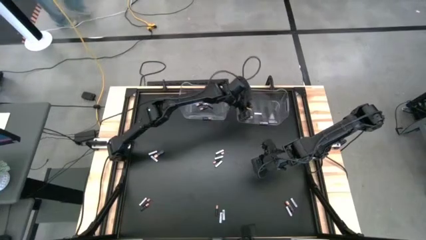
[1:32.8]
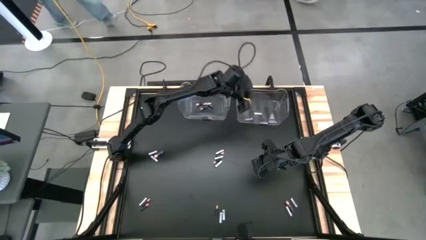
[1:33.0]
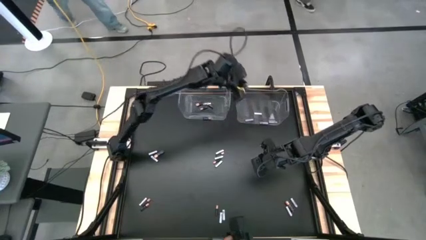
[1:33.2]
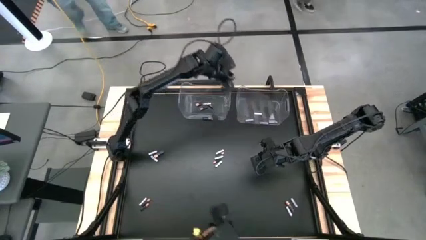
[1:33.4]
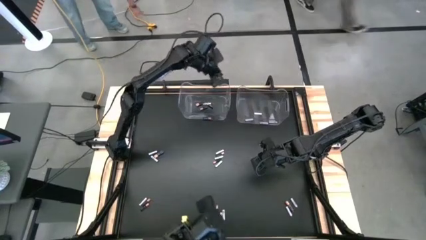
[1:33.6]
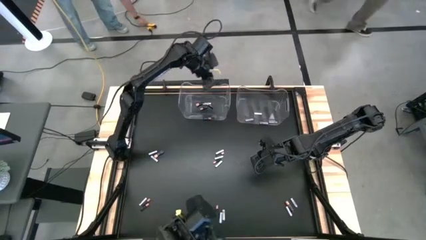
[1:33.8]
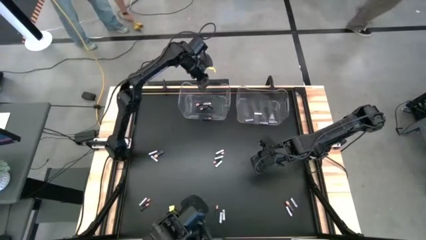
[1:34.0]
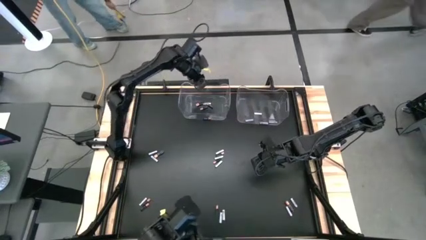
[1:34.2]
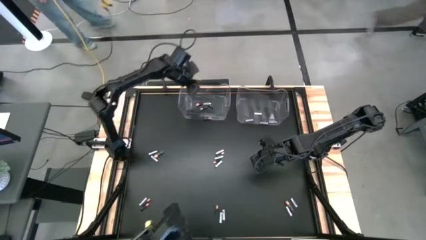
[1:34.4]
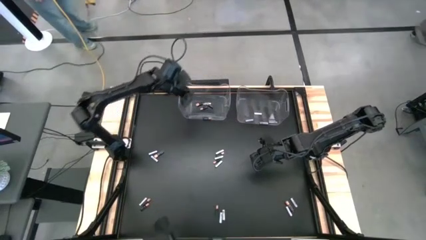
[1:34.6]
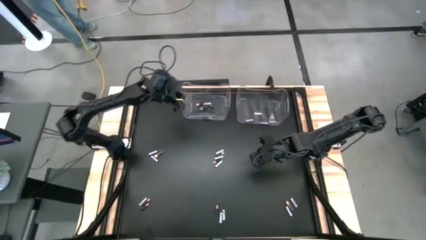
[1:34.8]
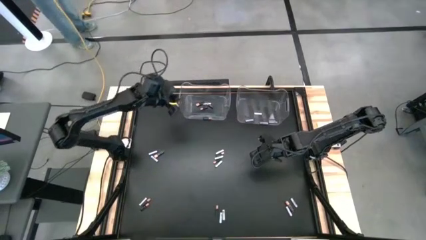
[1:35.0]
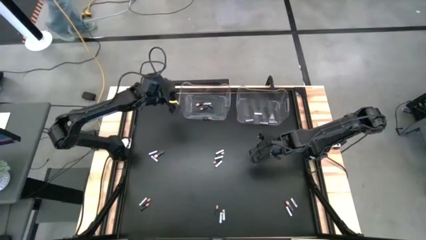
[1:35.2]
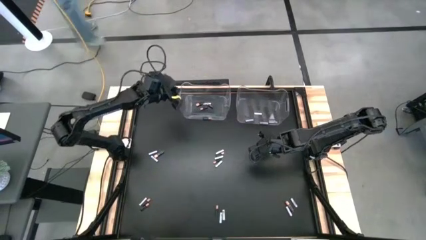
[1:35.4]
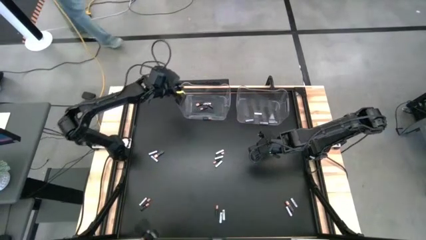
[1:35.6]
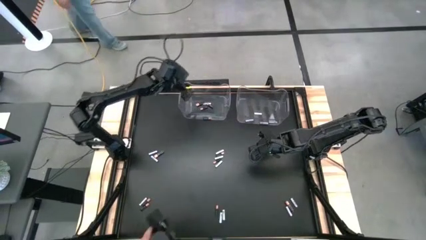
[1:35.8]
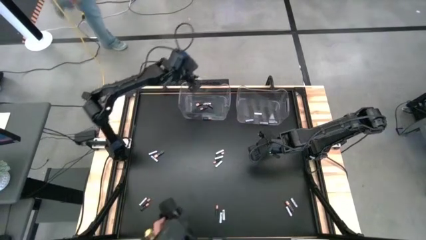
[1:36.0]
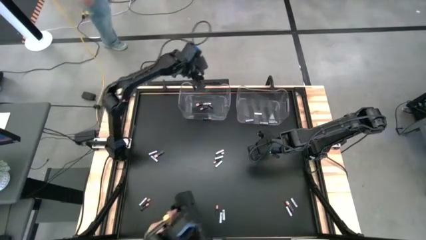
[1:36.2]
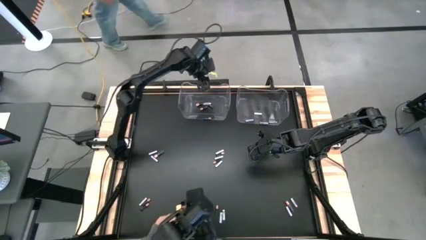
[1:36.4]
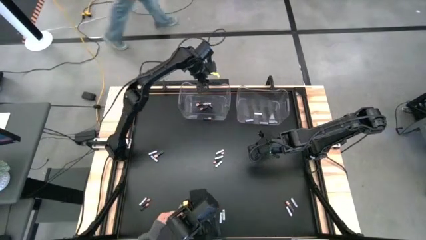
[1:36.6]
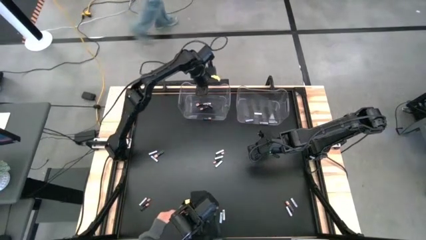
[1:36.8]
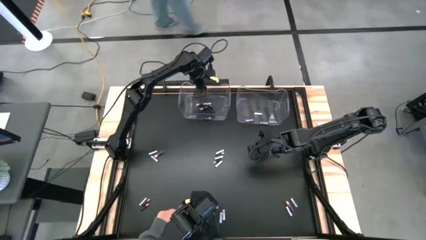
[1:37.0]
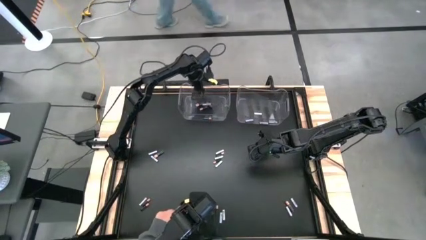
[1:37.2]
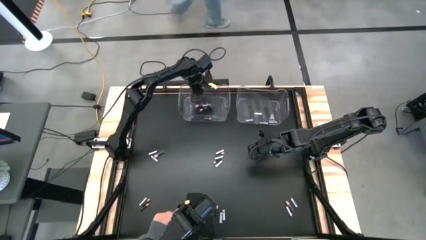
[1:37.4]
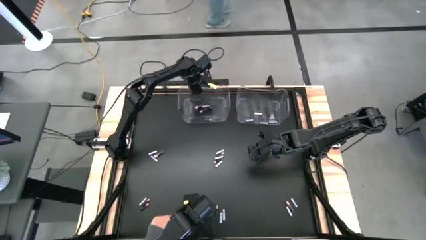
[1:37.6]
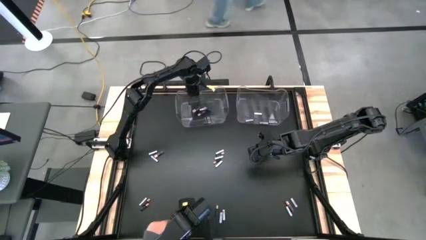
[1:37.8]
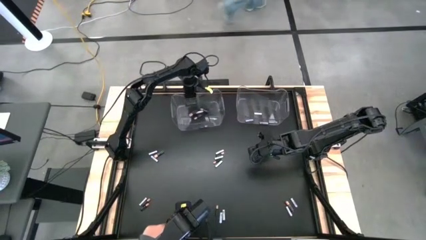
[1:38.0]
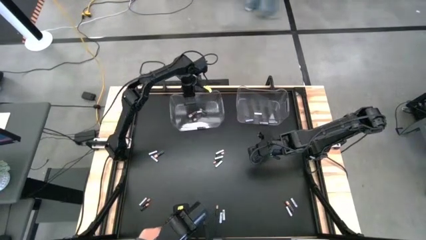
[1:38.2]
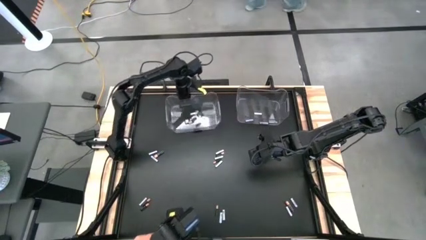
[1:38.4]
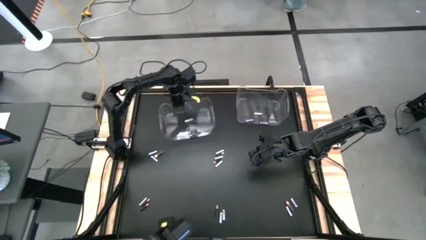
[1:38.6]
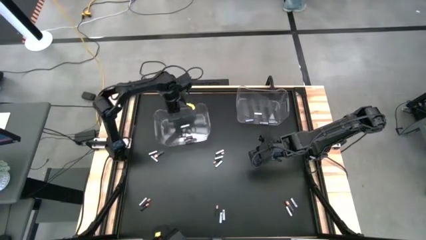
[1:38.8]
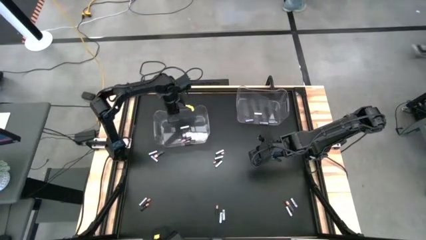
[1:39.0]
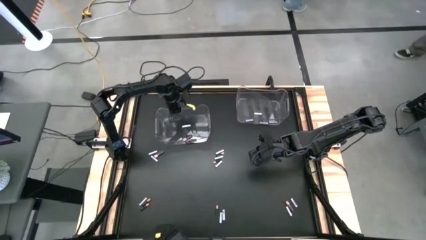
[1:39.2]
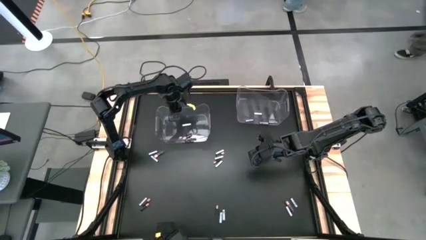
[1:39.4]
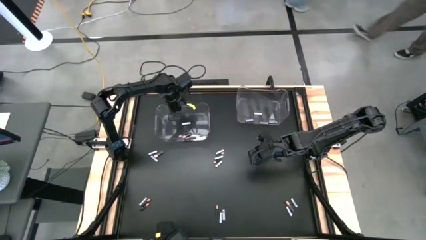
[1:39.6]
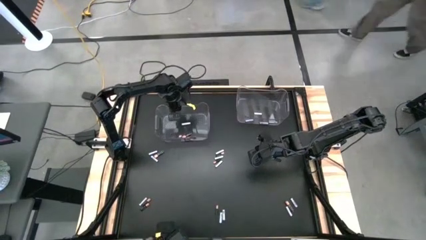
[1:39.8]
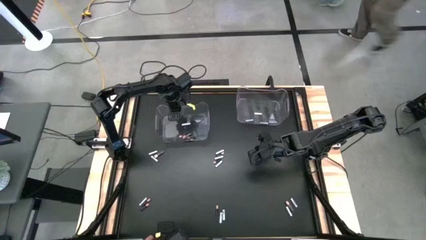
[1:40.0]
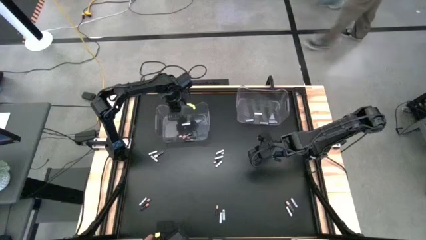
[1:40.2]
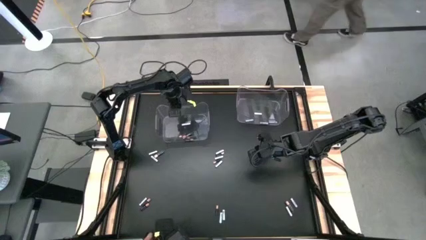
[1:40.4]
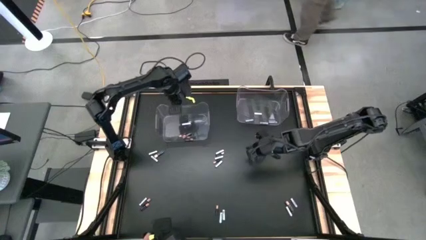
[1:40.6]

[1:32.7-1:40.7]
Task: Sort batteries
Move the left transparent bin to the top left of the table

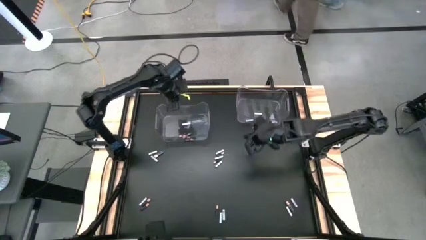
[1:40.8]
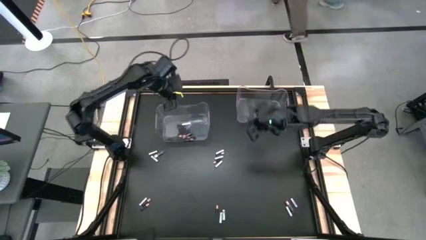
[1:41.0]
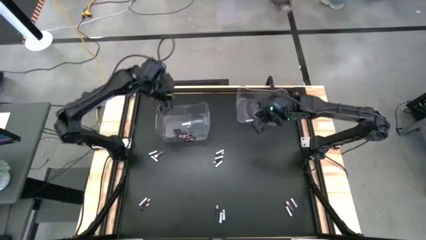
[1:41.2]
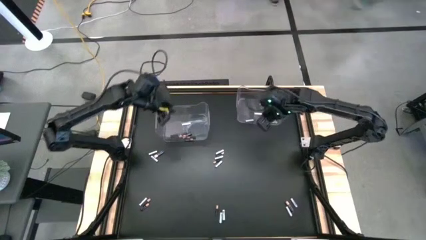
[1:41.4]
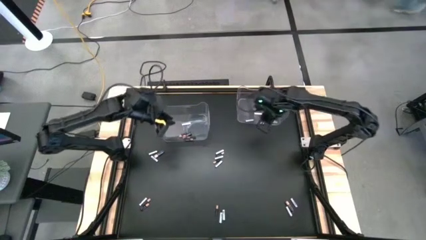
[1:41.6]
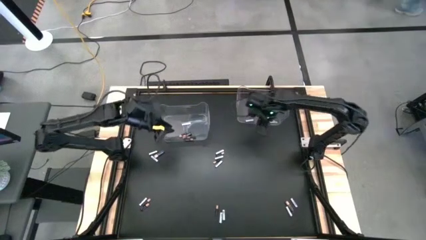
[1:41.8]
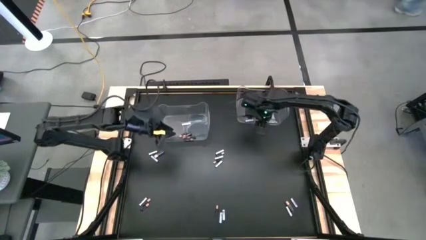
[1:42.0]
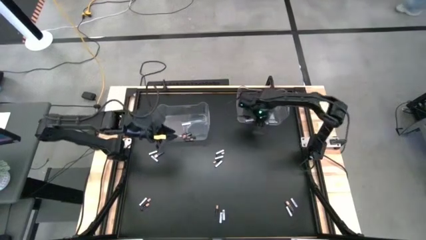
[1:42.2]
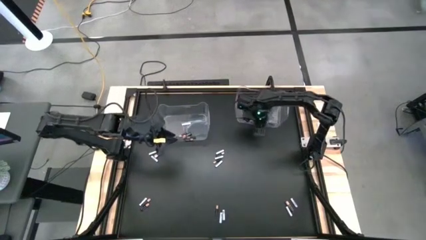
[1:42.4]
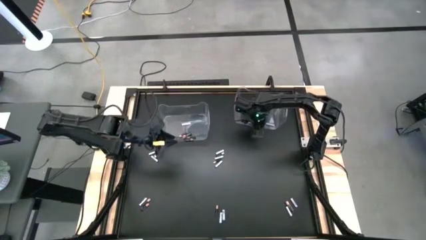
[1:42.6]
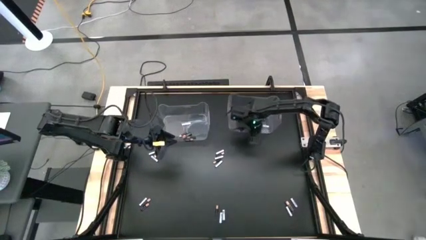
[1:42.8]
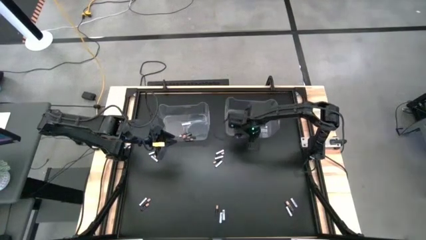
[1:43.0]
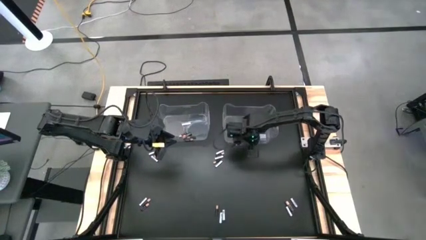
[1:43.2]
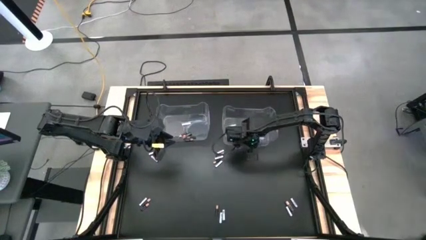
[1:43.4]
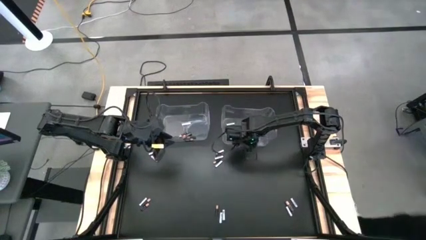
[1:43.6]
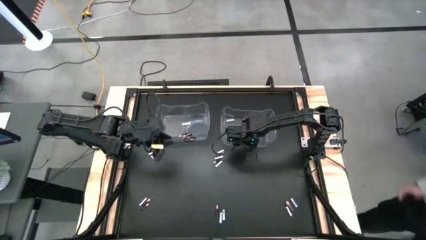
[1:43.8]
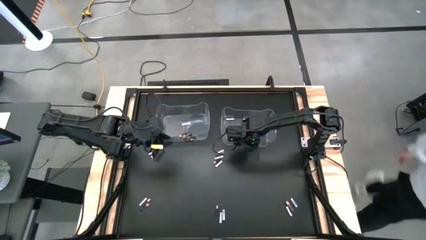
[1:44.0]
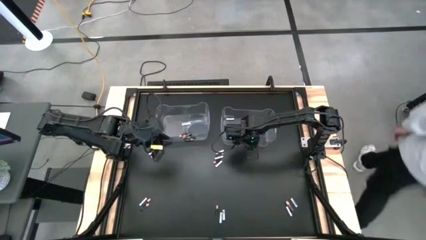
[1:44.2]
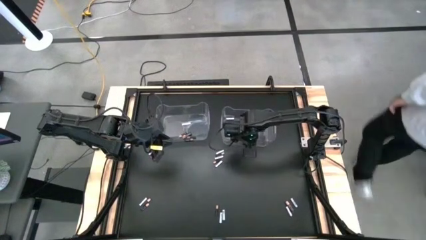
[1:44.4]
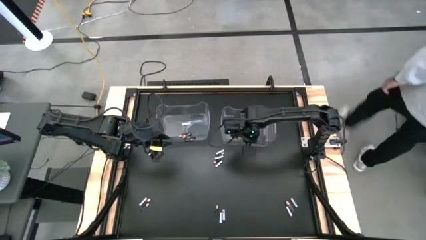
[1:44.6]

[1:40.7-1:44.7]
Move the right transparent bin to the top middle of the table

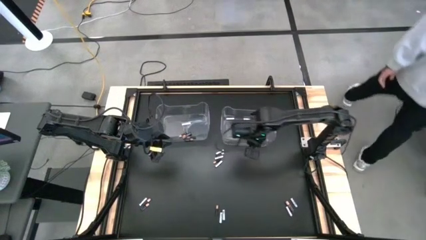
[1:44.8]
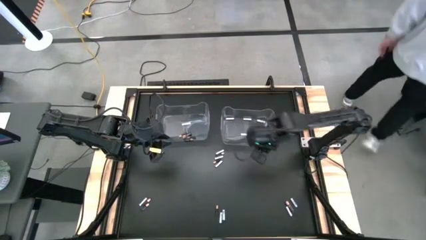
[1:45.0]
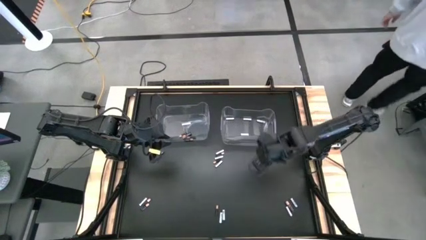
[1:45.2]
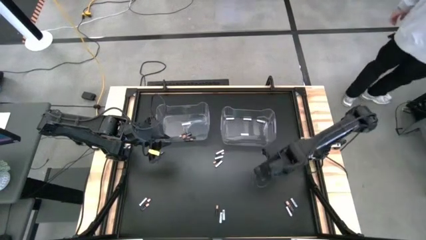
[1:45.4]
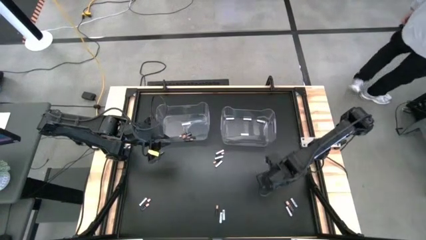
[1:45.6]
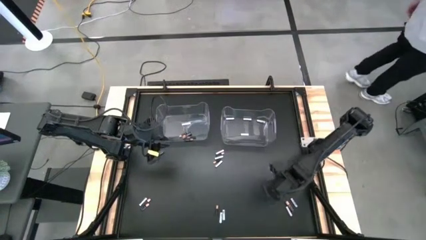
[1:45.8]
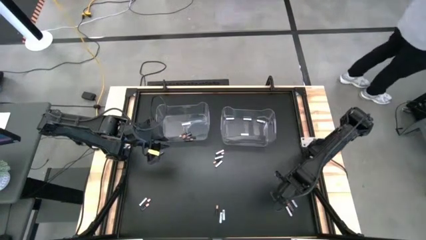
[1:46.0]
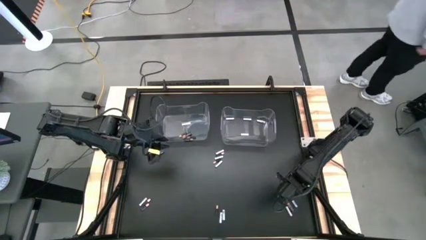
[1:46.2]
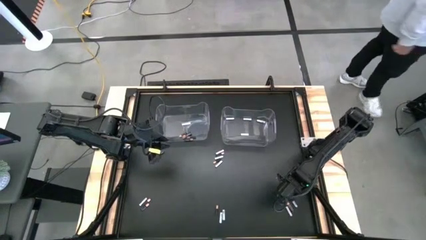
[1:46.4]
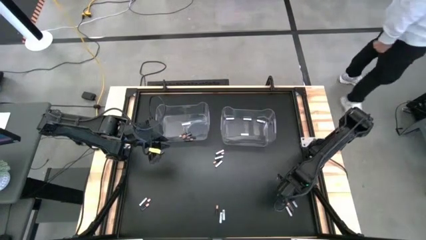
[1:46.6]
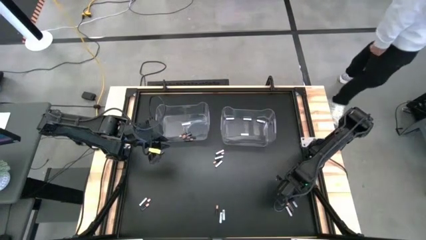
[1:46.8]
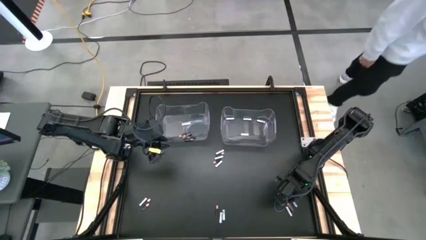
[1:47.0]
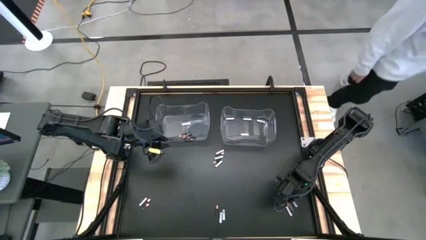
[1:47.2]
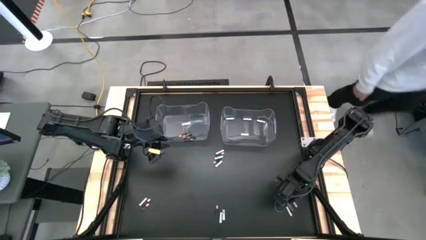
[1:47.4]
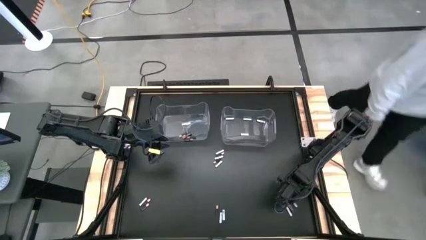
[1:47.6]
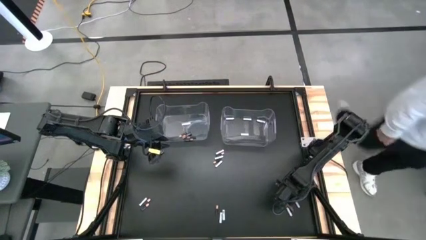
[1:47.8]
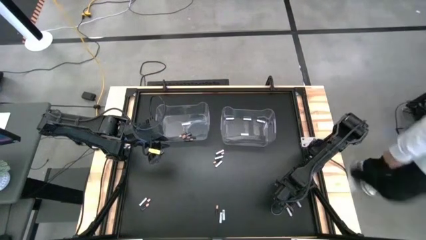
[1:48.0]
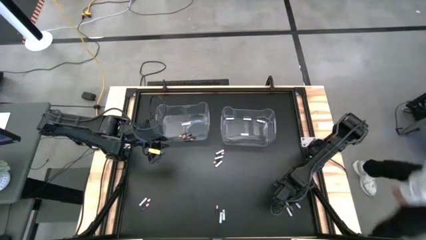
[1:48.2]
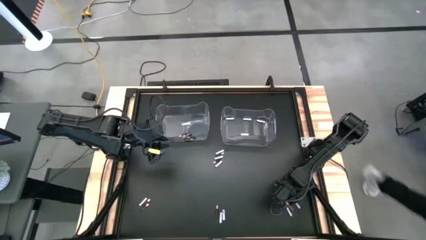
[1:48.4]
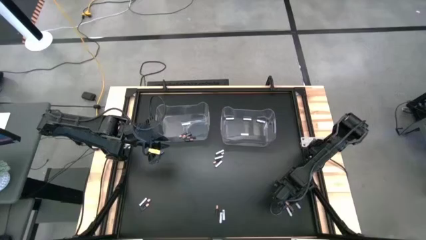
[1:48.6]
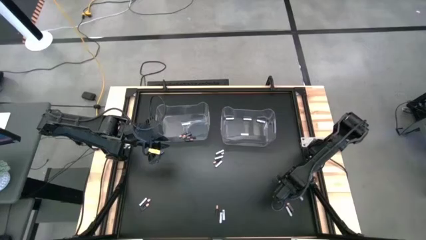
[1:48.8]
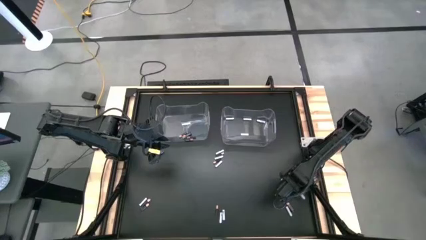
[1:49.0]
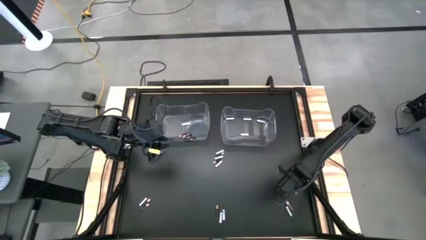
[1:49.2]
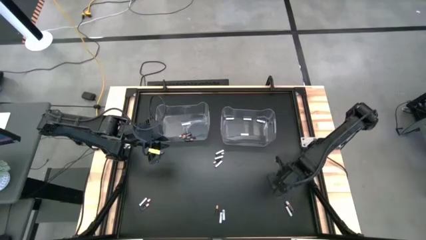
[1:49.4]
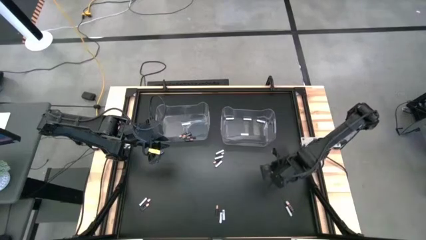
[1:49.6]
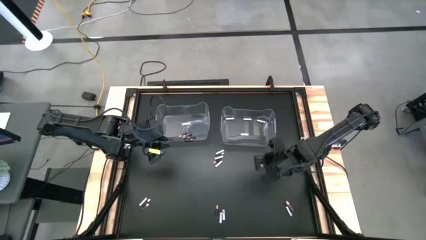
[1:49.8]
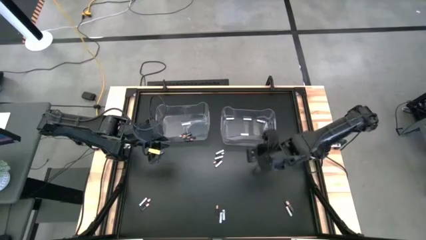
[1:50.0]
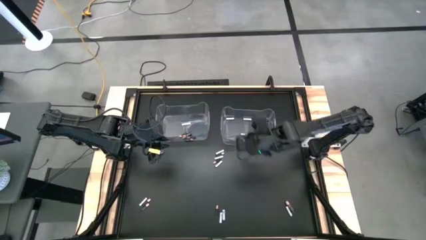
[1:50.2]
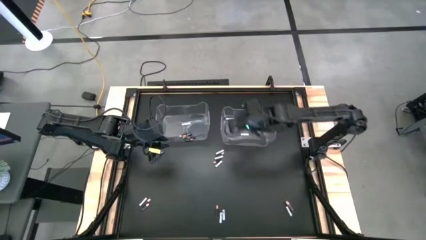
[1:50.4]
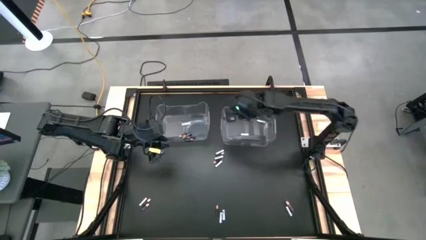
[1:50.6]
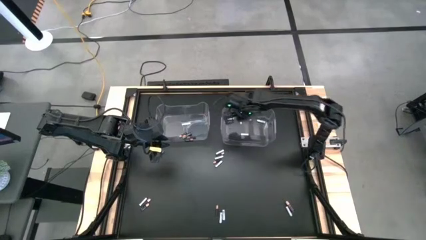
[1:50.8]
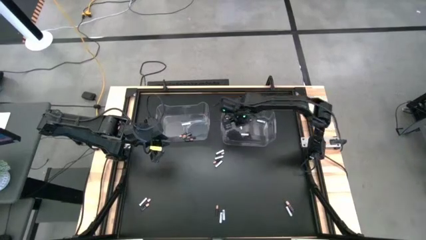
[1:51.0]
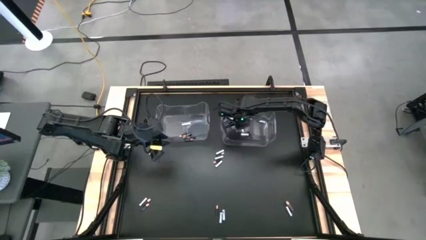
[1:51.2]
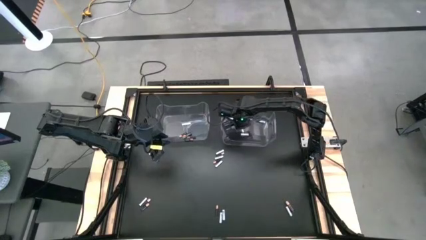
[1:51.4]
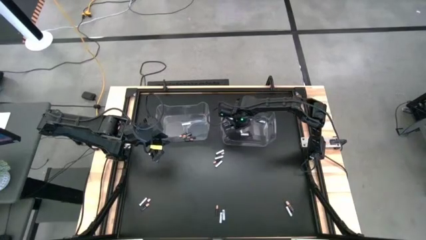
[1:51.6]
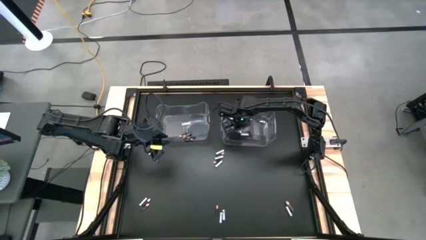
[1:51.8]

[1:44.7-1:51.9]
Put the white battery into the right transparent bin
